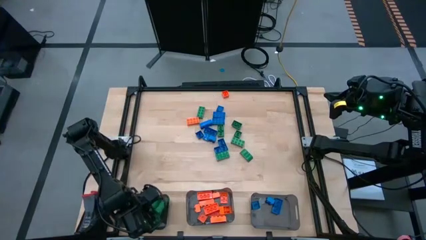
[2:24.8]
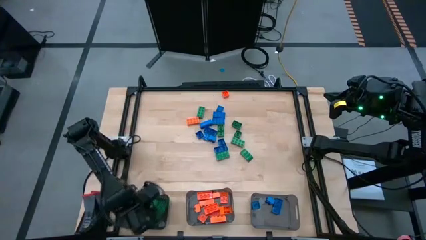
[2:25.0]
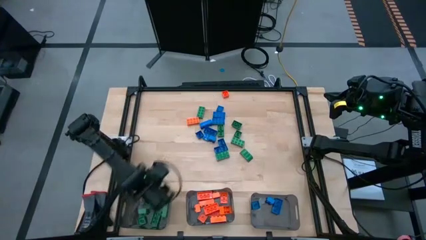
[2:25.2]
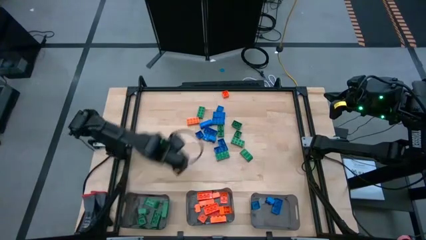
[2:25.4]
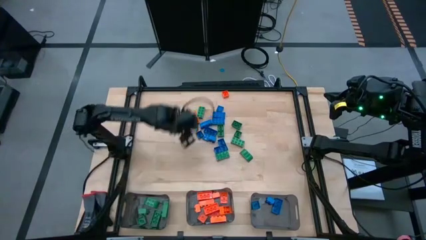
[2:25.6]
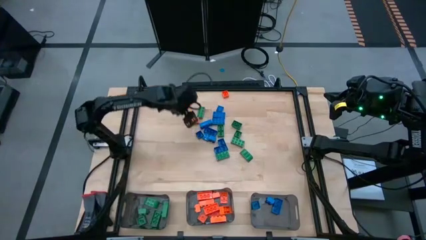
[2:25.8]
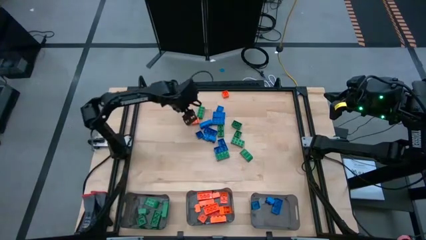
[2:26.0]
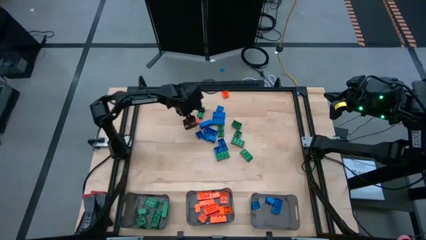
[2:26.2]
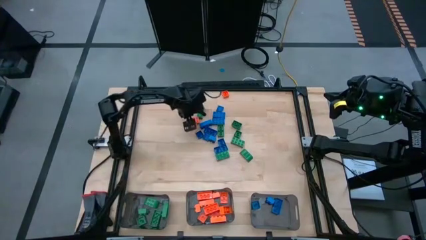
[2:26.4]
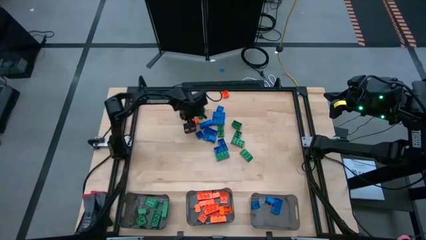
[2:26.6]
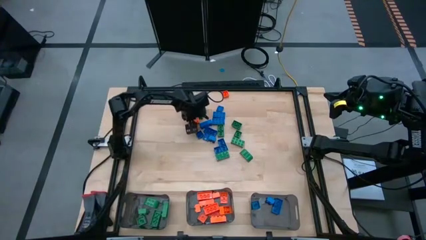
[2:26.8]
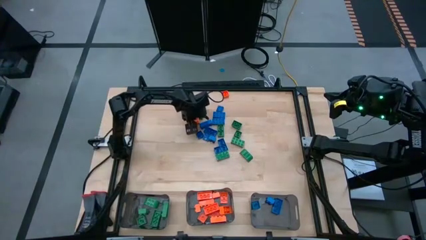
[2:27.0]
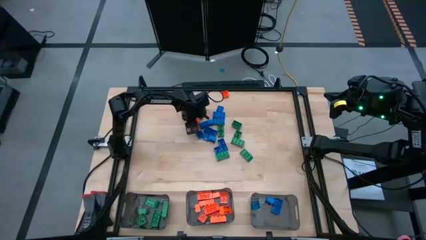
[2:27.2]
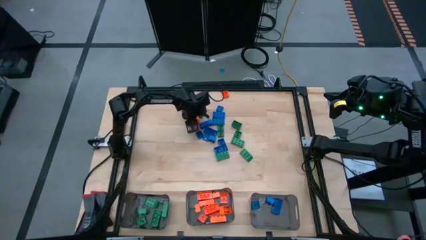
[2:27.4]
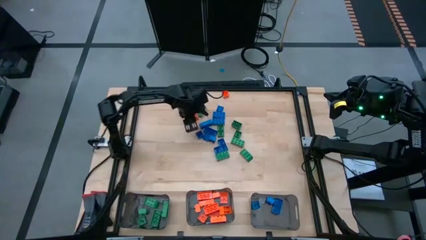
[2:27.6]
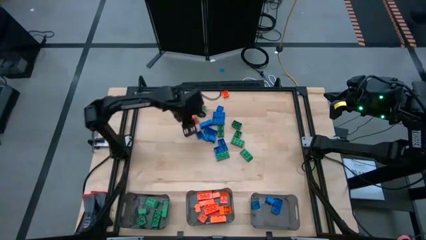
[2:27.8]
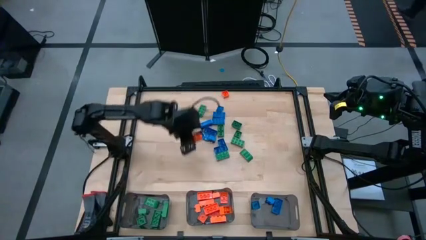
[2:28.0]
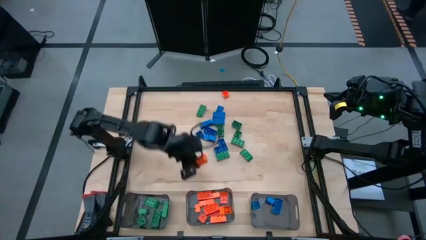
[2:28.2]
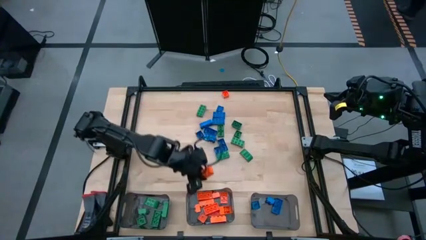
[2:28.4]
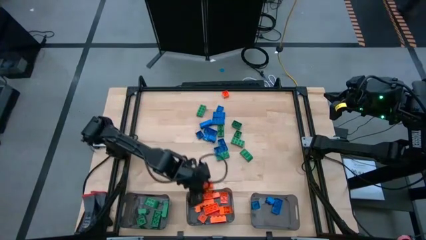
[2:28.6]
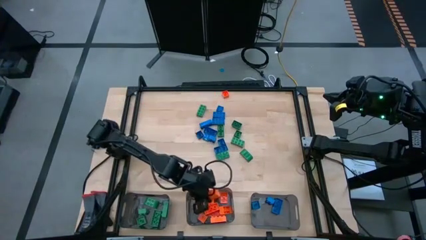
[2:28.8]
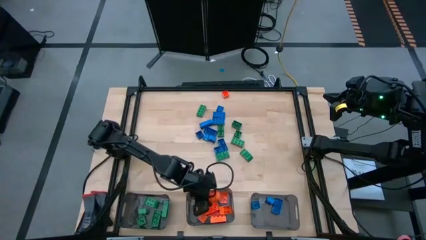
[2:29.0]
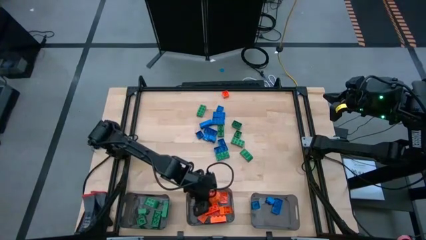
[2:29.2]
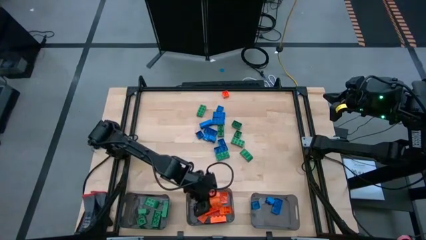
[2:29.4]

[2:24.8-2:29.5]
Task: Sort blocks
Put the orange game piece into the middle black bin

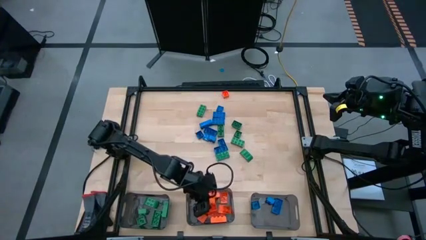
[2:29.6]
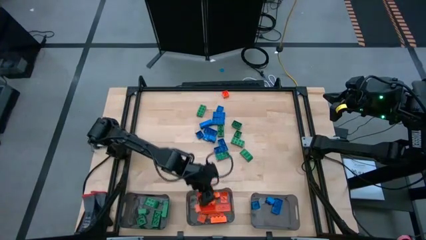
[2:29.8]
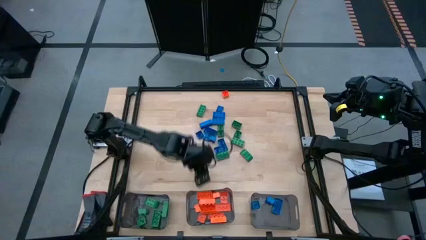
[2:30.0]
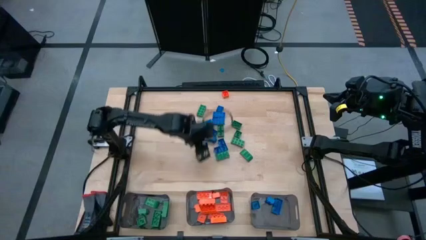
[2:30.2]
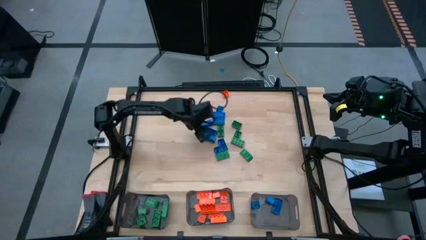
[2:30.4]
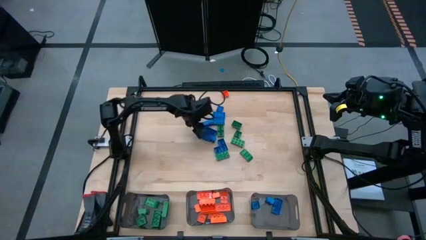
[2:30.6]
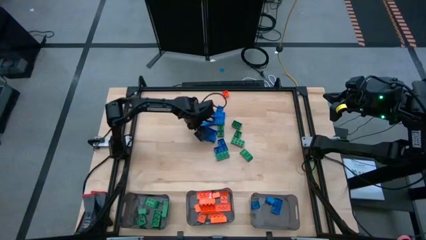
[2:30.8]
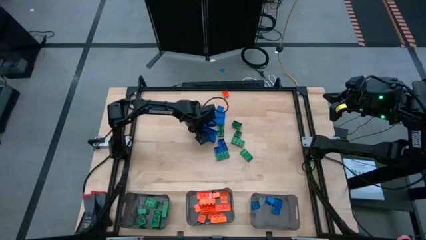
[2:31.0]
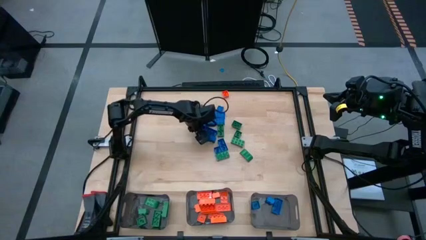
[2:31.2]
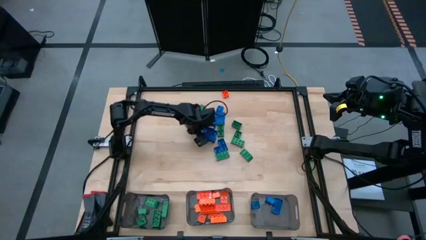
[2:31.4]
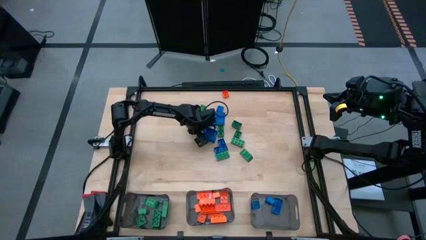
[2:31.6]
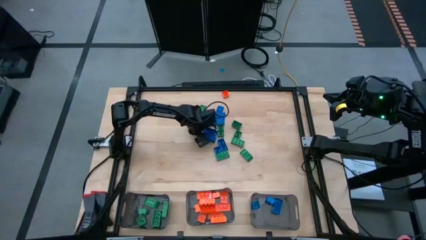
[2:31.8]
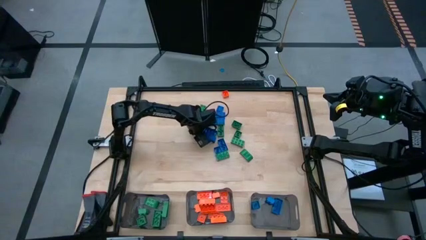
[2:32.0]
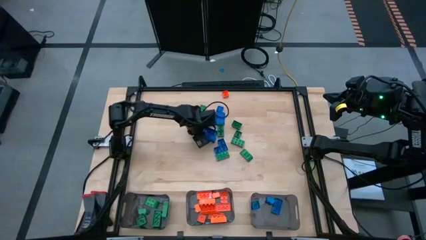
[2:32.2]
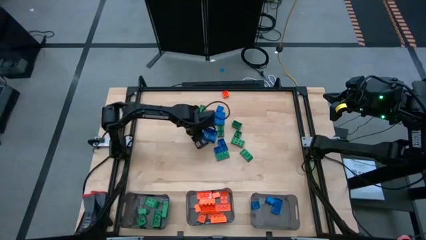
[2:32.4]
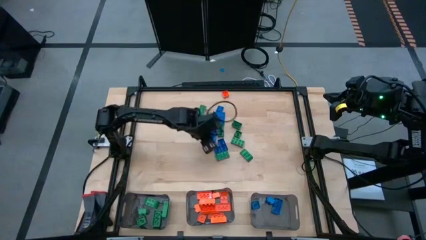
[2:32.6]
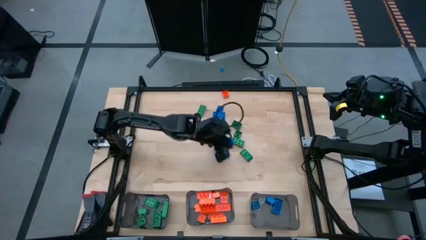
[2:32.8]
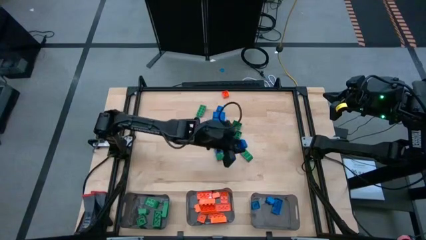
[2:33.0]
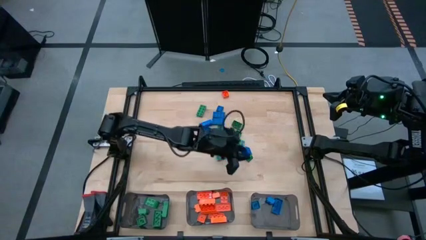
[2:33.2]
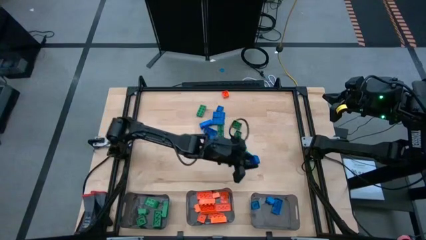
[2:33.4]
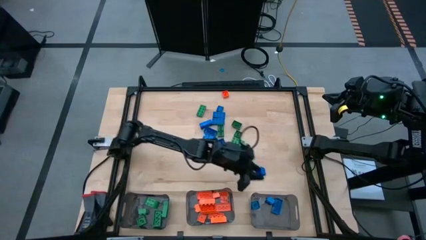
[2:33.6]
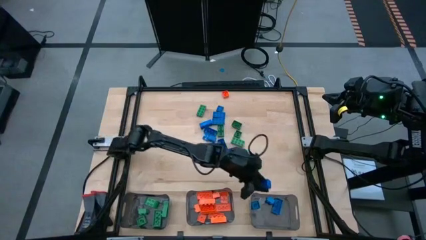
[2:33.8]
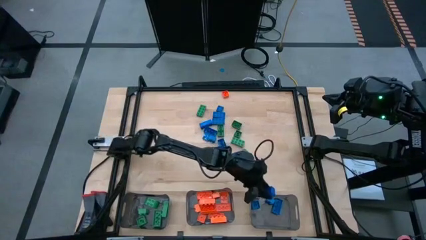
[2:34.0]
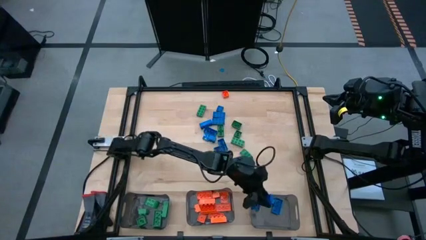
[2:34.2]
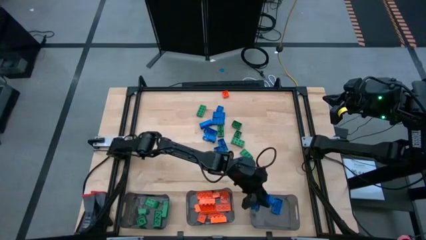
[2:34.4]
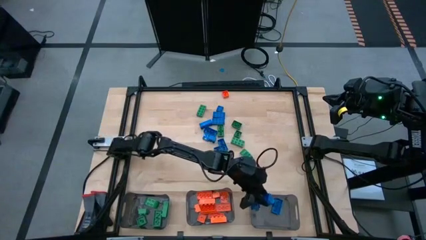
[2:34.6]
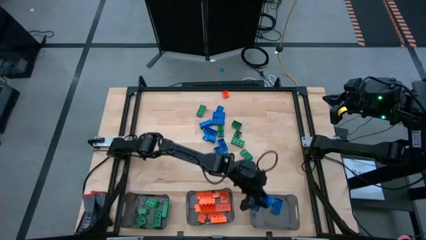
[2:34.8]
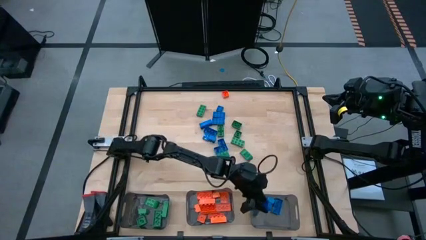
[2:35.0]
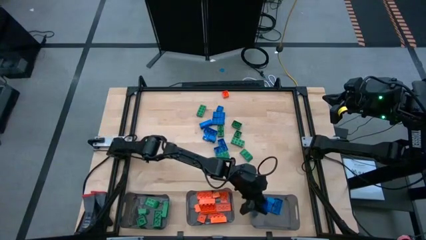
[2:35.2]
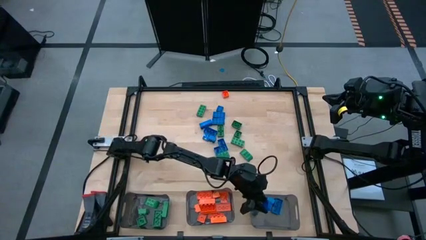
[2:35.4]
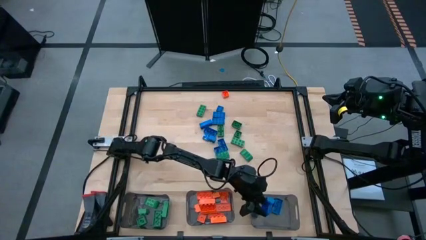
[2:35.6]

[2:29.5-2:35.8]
Put the blue game piece into the right black bin
